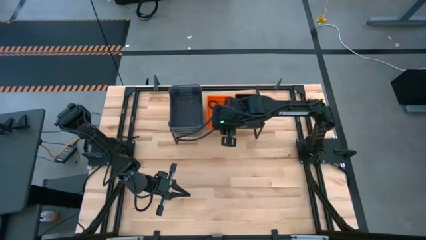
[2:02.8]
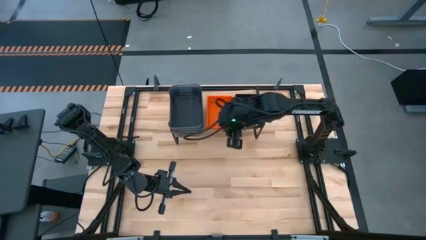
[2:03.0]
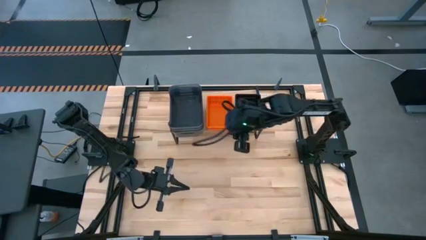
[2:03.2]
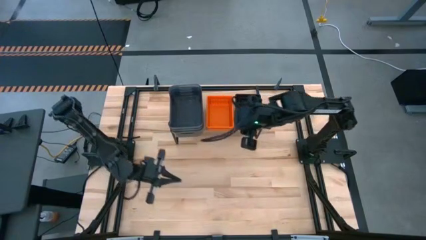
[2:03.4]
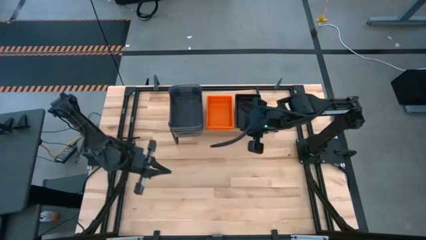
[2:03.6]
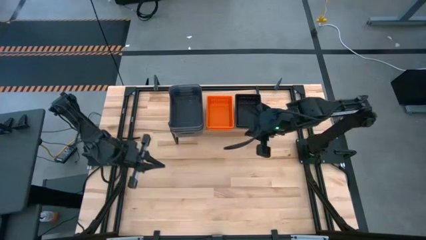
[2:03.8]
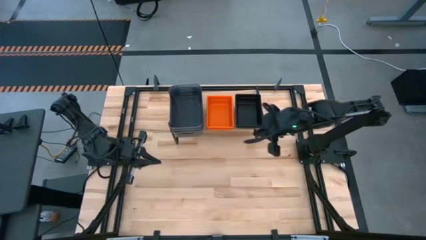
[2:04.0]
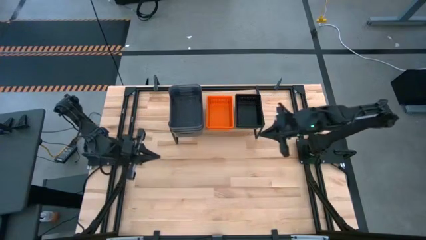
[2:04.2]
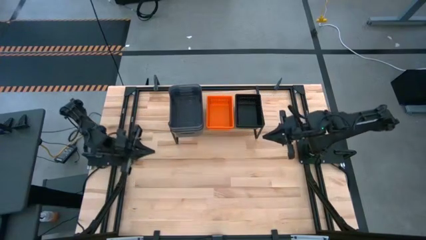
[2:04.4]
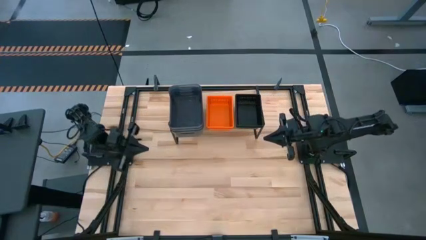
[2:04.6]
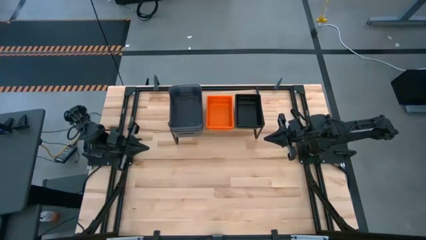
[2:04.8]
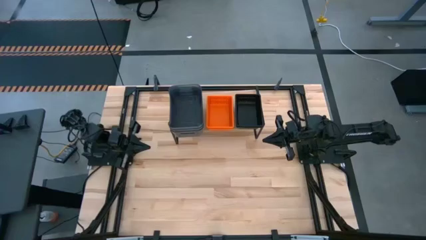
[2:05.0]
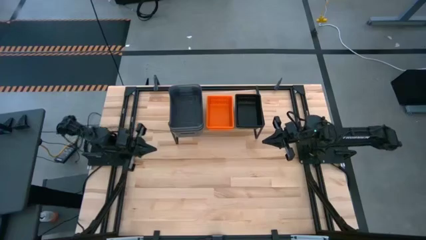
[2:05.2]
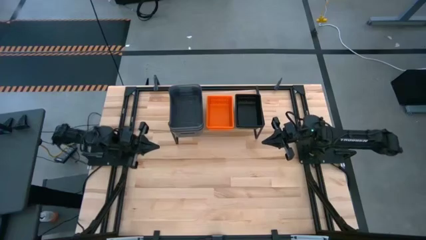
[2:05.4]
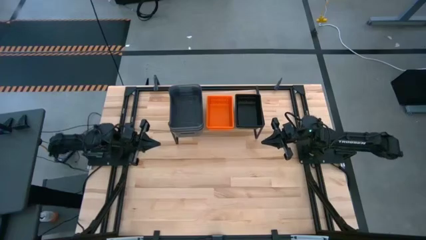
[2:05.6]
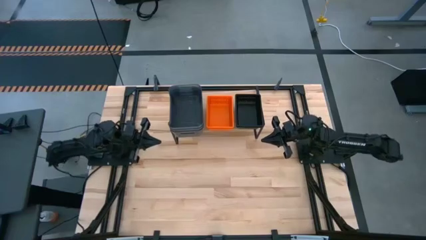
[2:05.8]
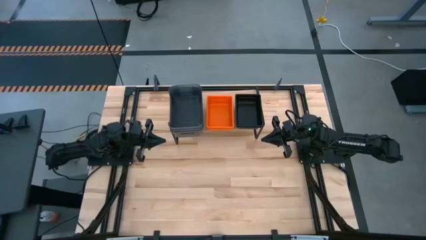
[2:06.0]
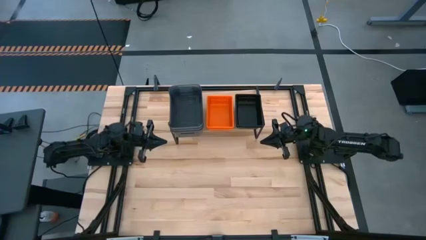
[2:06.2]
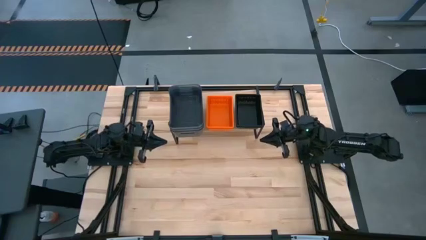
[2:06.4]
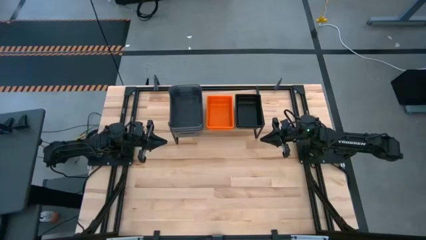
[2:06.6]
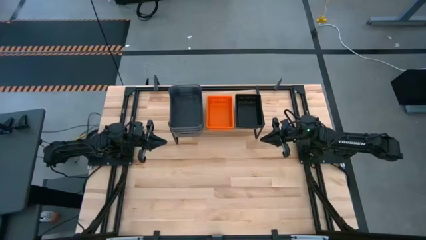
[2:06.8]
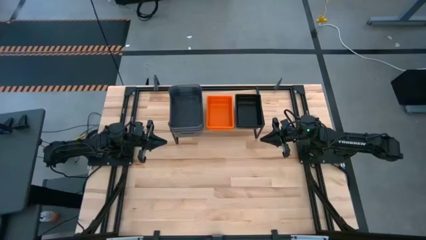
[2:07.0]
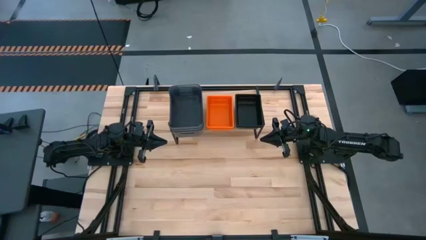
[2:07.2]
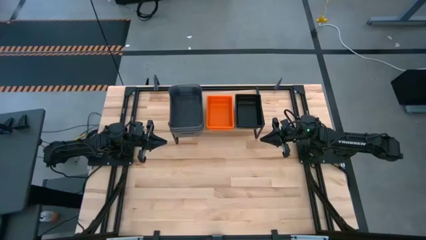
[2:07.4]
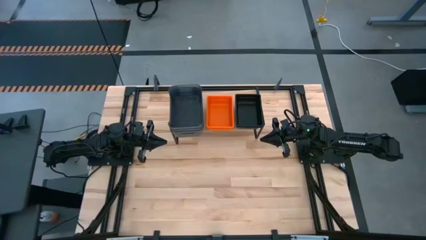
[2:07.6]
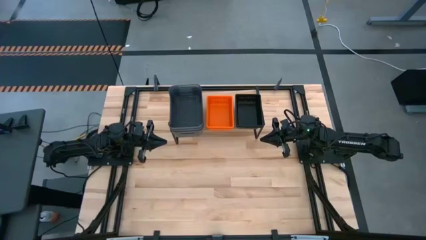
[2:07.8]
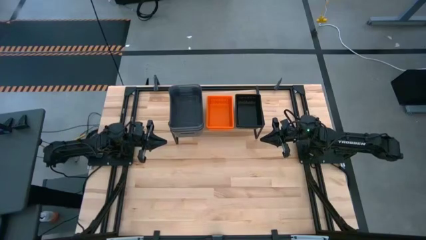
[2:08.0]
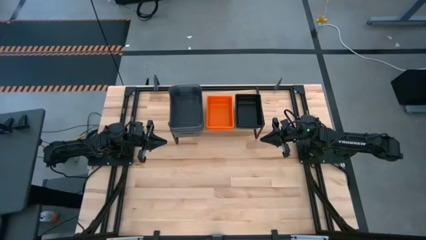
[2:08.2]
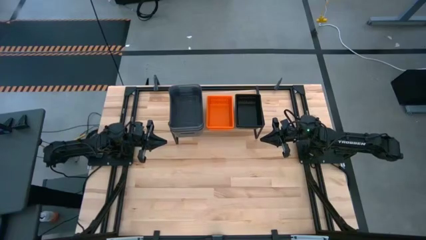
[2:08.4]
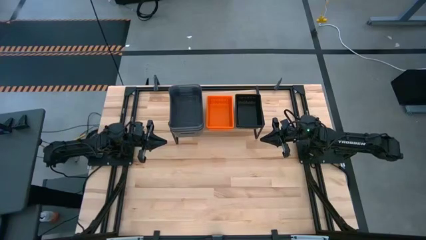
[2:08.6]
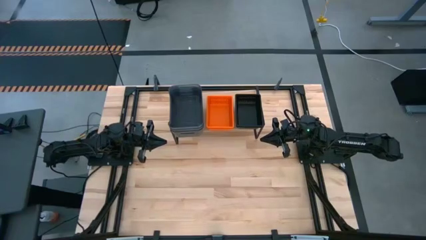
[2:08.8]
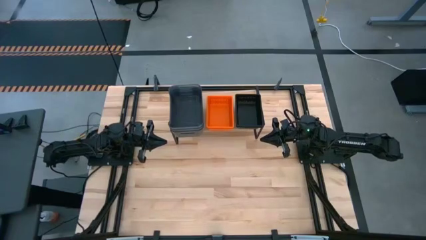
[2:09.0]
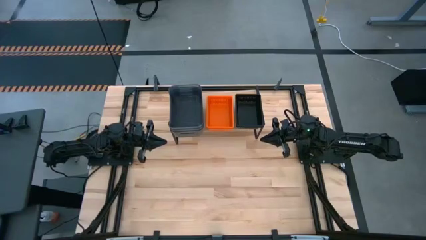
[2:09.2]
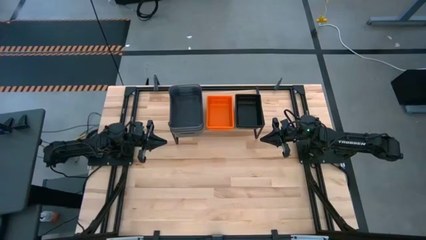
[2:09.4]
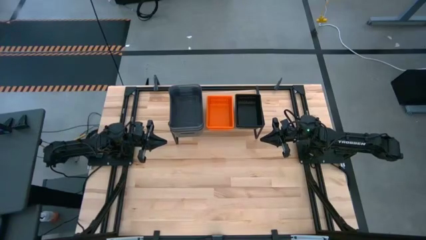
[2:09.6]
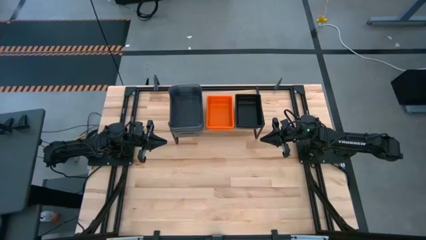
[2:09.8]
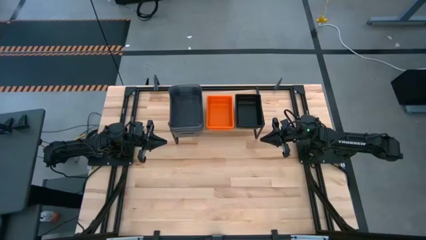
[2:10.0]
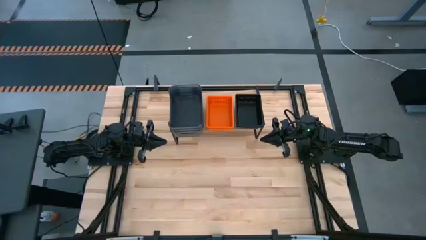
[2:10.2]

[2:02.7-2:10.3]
Task: Stack baskets on shelf by color
Return to Home Position

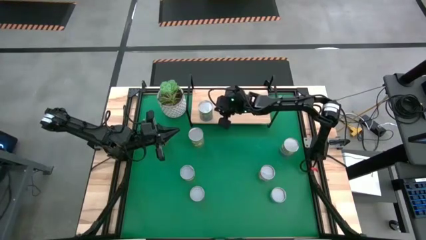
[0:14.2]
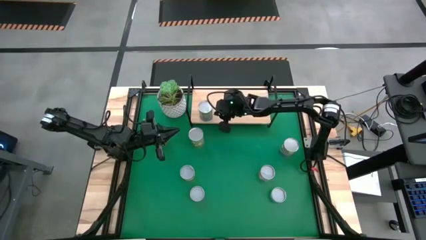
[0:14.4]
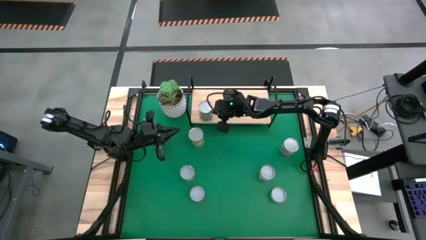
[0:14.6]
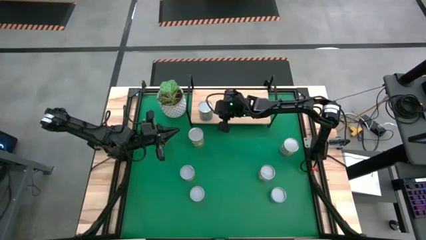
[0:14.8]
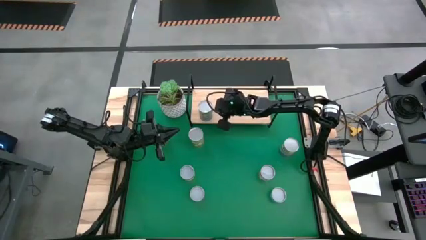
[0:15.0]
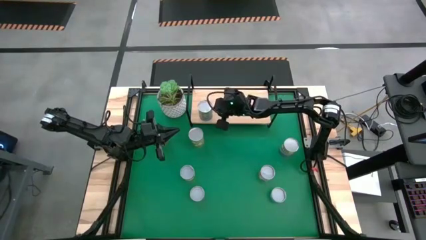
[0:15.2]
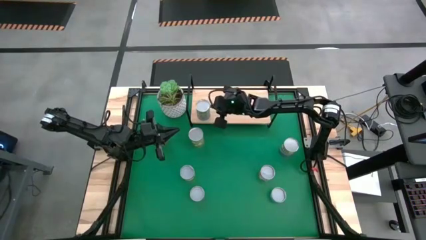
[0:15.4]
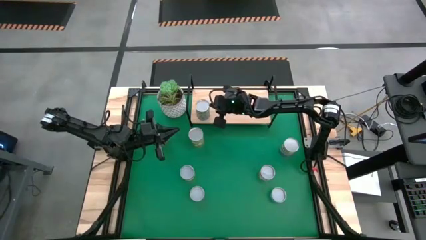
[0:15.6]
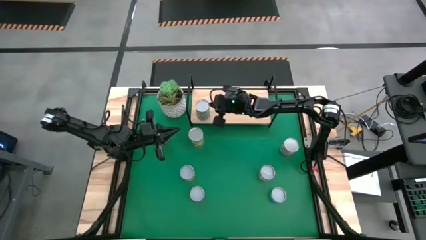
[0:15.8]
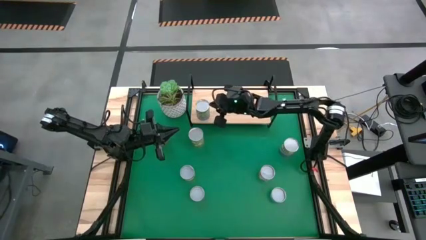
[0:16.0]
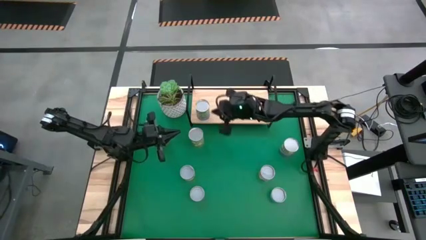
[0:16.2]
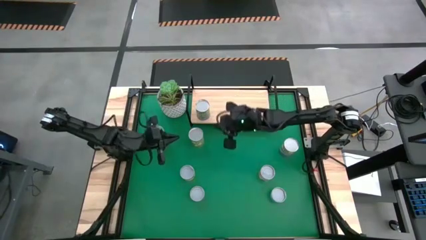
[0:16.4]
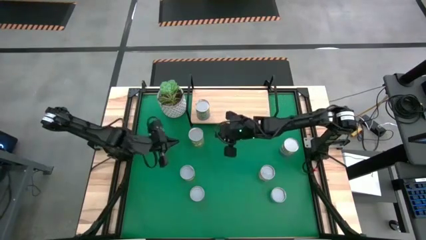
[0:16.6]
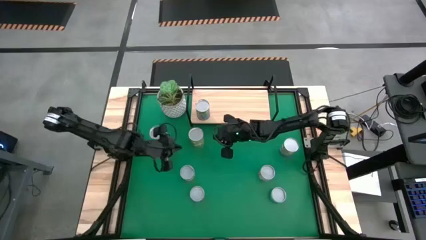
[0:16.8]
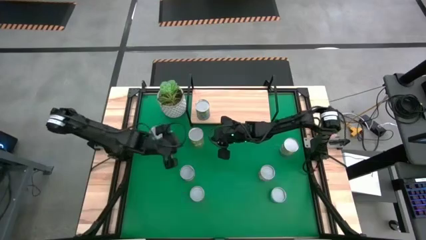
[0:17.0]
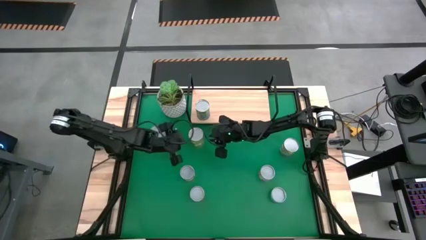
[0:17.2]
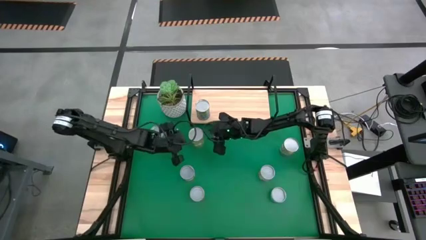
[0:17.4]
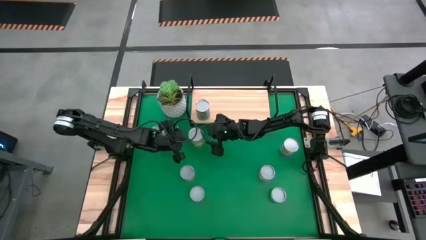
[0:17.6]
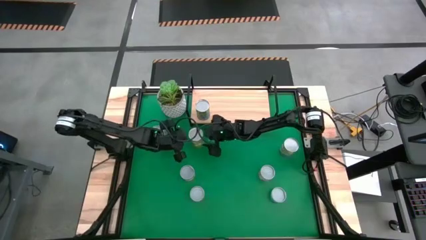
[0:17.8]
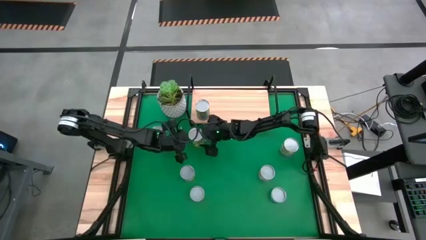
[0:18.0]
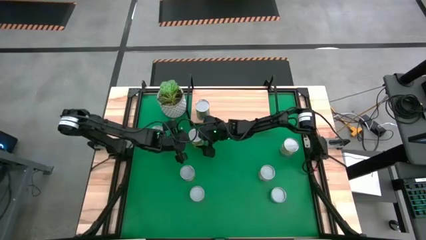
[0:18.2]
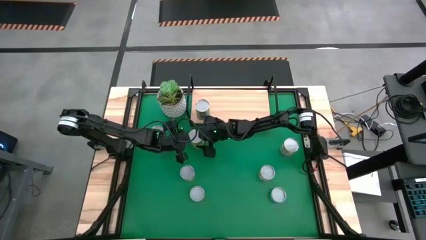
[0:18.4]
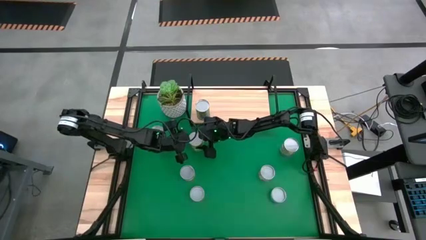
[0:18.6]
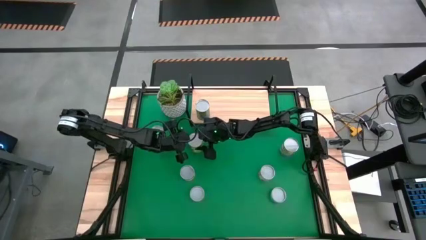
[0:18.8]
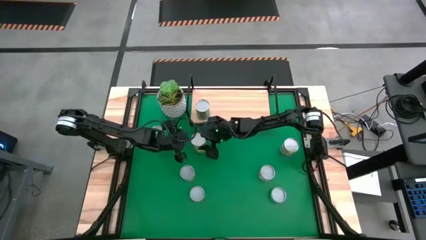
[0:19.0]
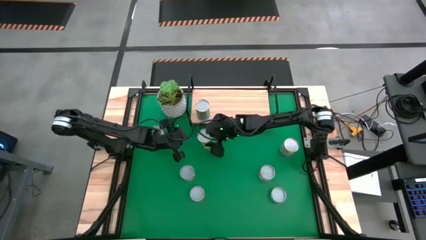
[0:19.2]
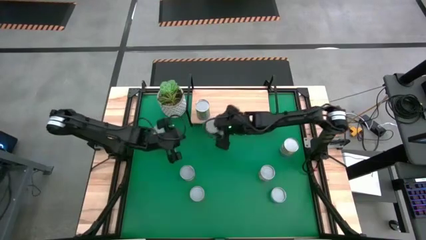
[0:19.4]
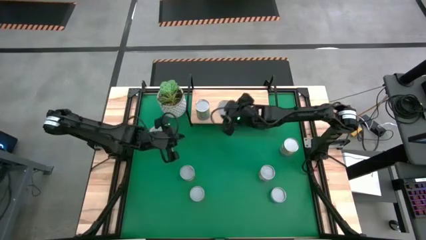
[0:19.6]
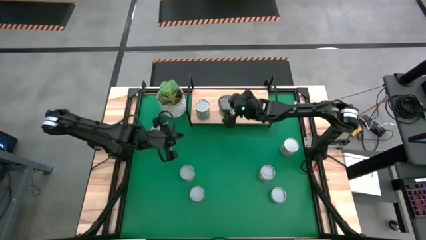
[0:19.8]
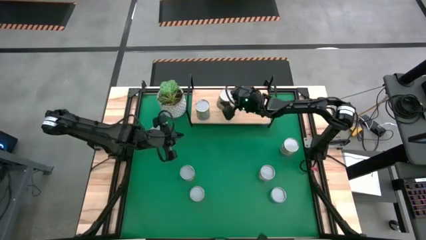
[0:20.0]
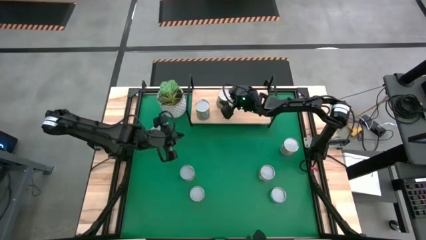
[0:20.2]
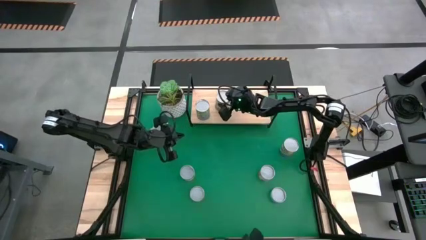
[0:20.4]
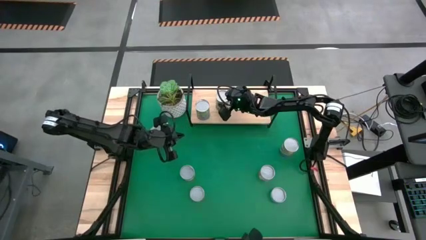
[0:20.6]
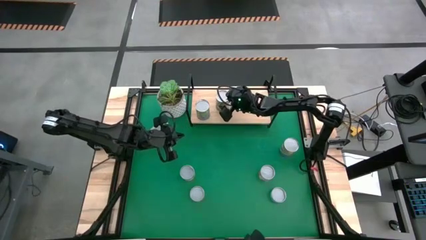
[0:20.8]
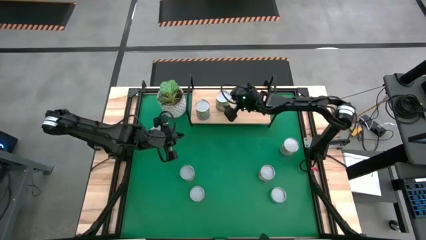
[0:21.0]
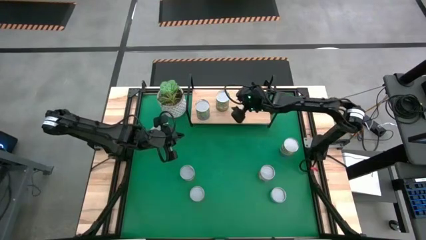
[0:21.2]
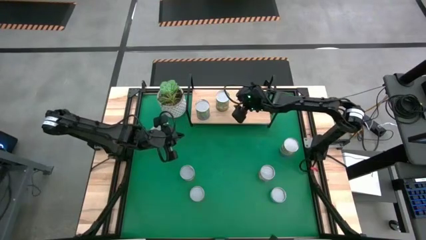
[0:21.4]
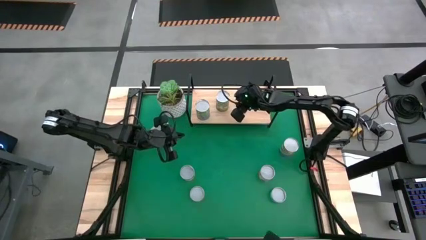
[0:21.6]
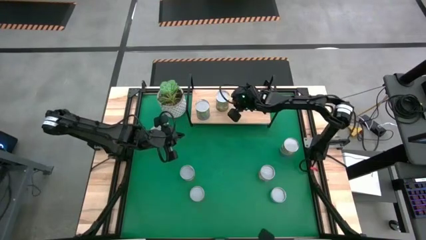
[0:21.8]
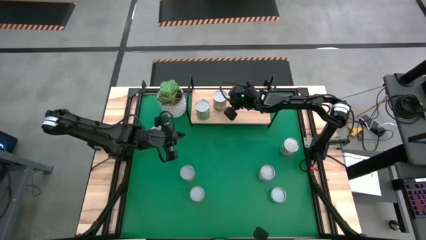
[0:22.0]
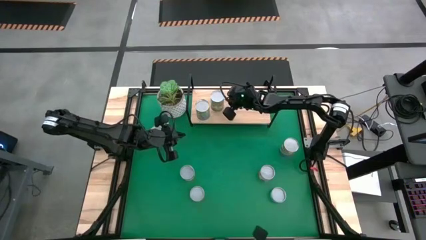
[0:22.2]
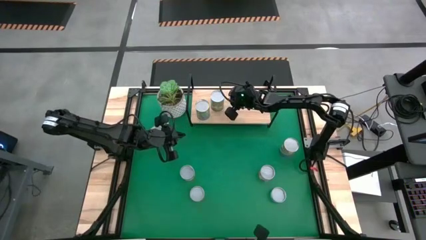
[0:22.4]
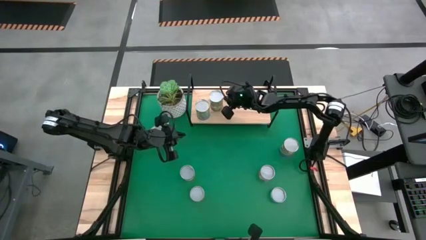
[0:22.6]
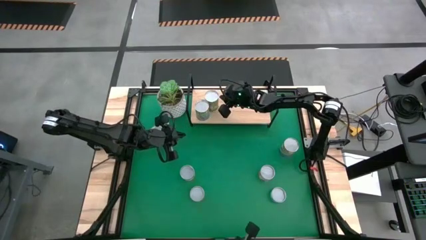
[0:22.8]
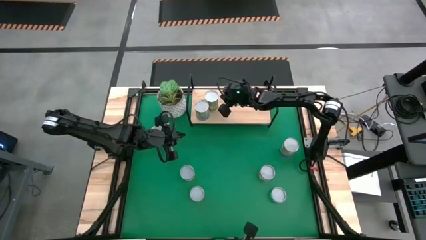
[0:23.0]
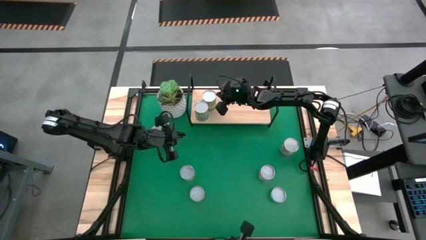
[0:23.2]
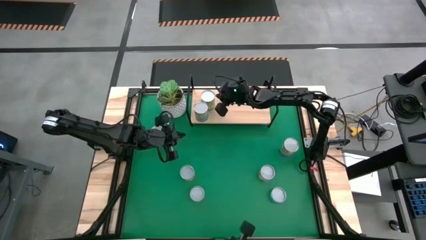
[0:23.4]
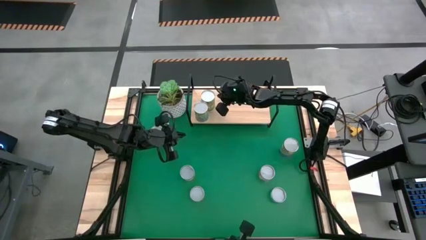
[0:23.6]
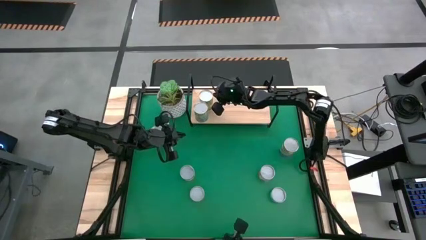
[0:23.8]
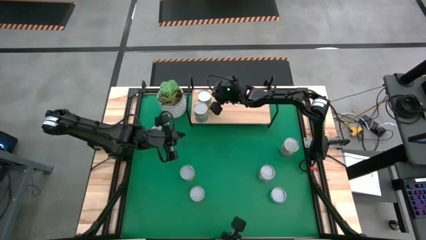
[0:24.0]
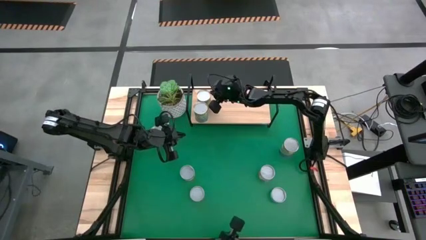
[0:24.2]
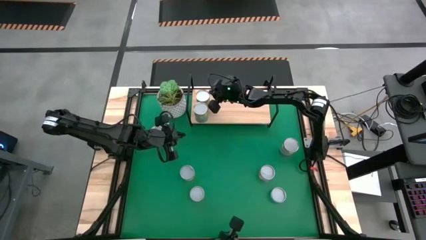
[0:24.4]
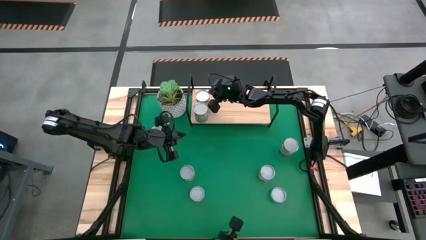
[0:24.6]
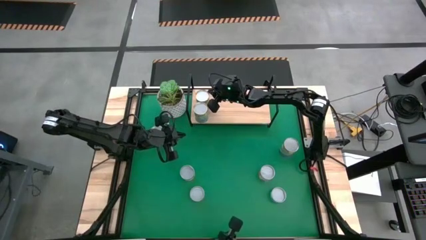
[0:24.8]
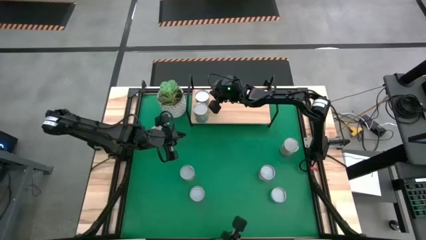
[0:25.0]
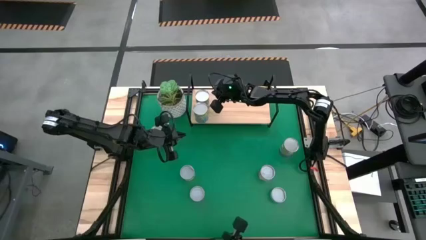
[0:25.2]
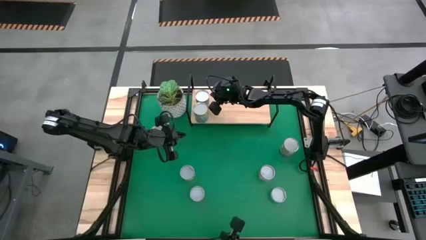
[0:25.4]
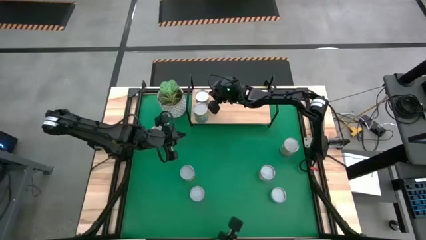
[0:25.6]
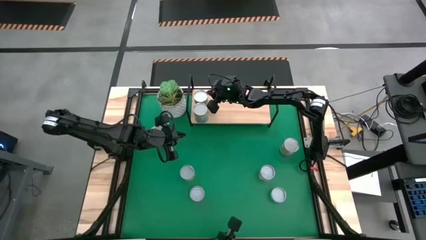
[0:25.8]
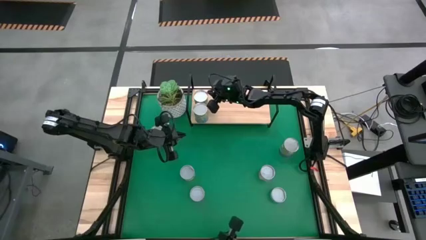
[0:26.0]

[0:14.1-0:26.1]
Task: Pick and place cans onto a shelf
Put the canned pears can on the shelf
